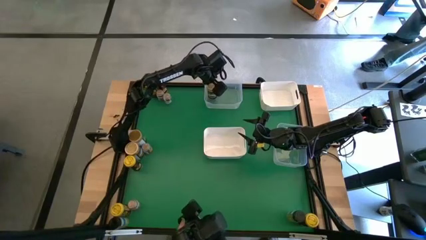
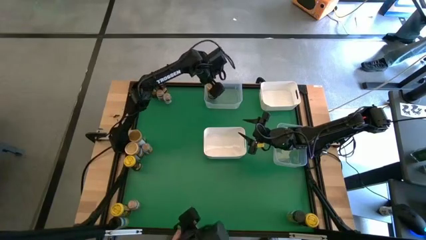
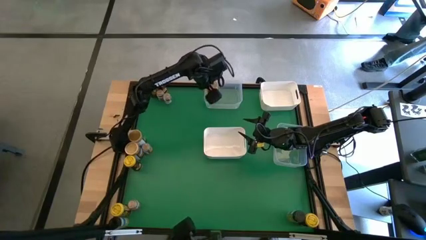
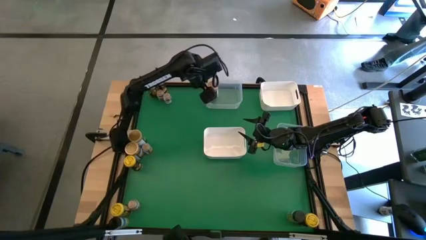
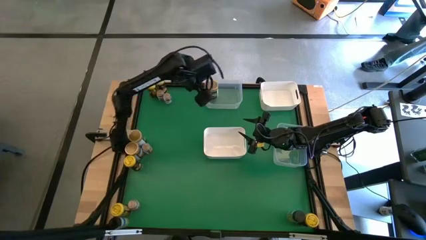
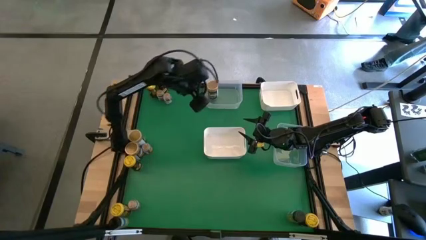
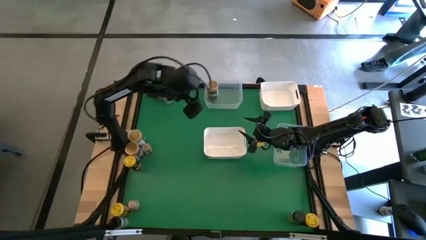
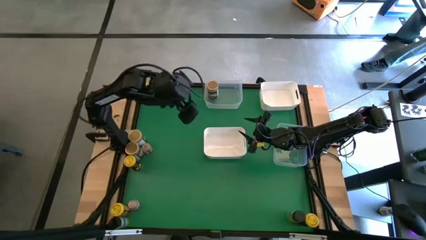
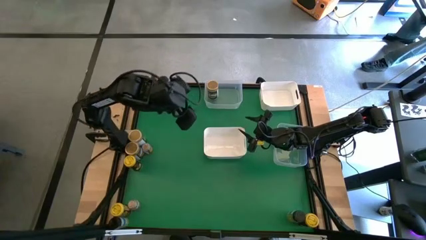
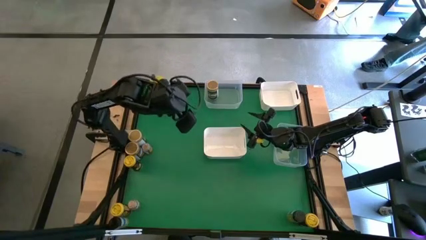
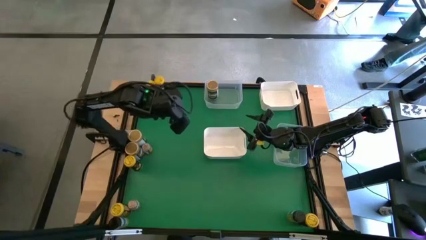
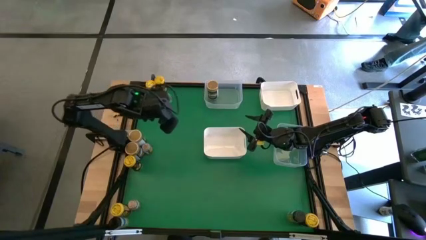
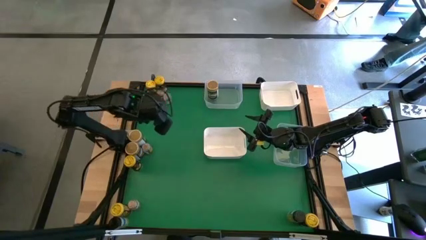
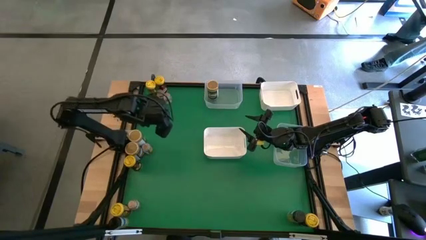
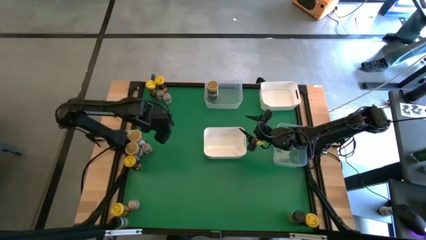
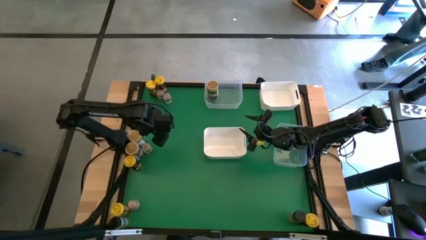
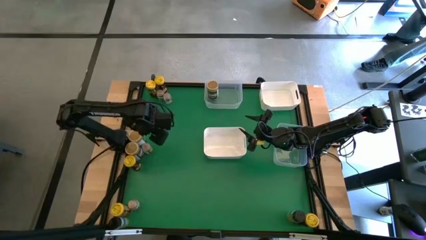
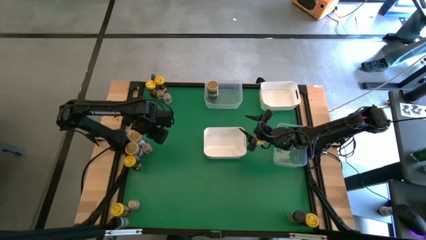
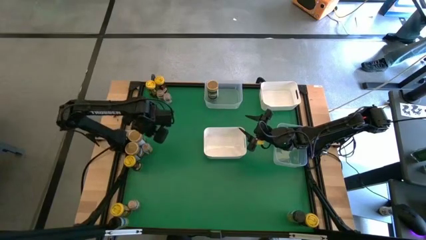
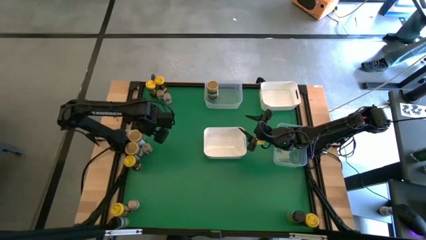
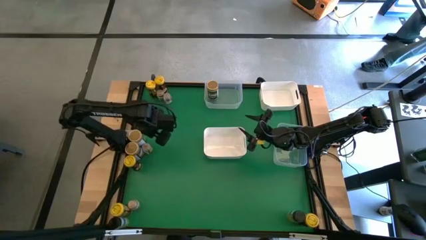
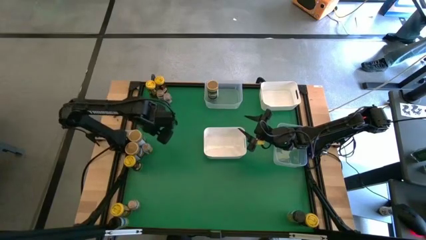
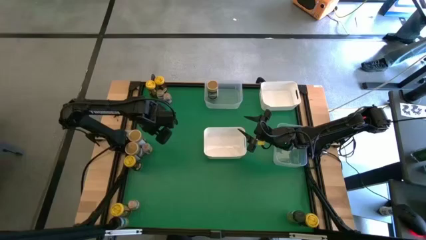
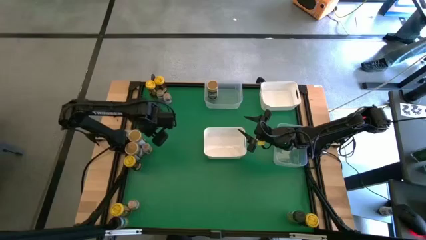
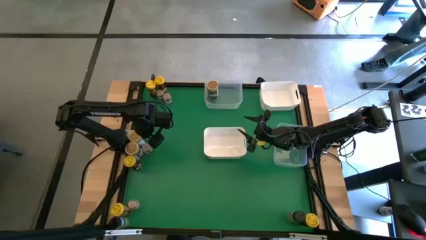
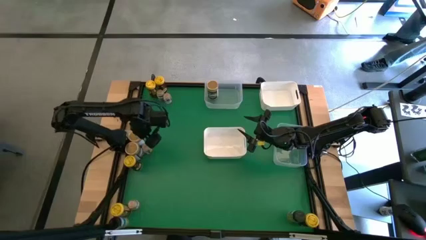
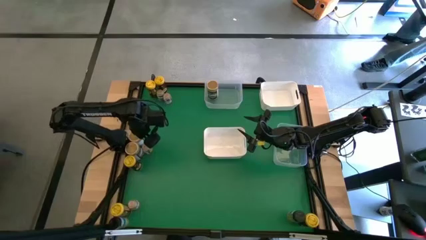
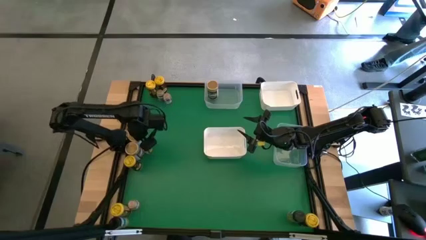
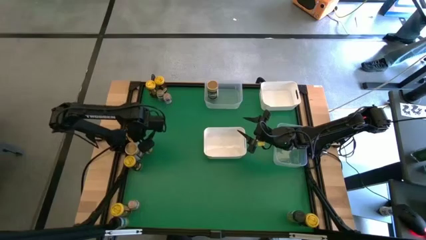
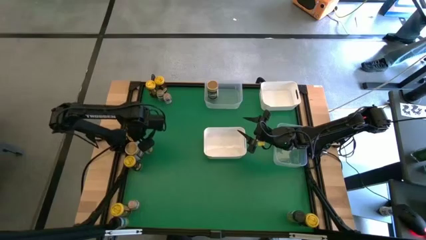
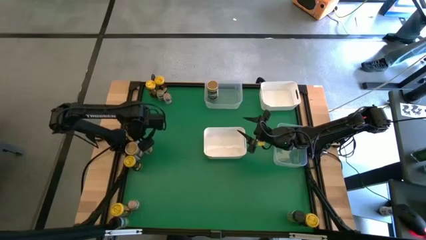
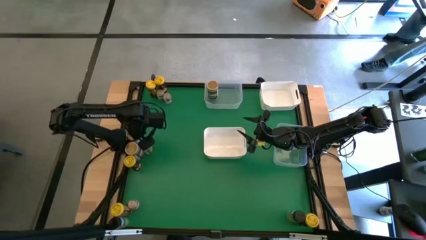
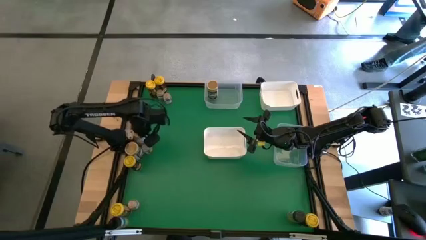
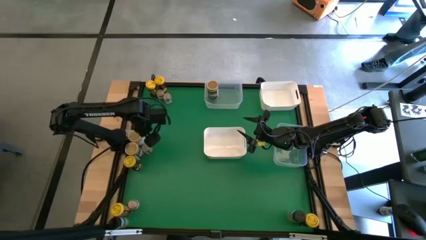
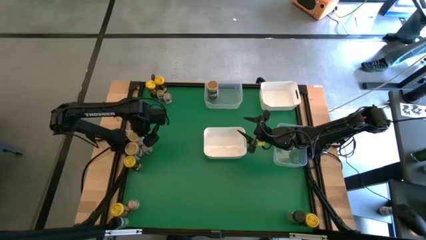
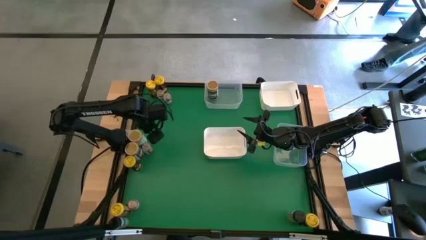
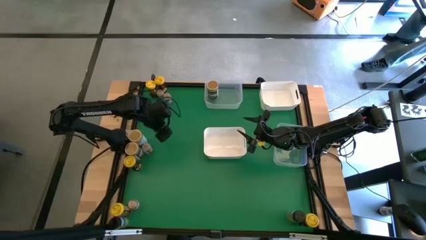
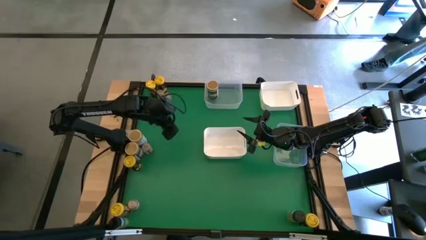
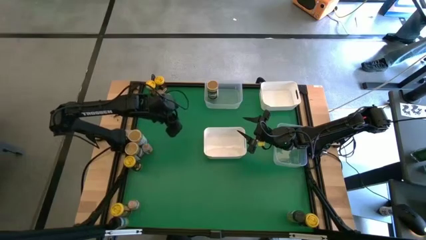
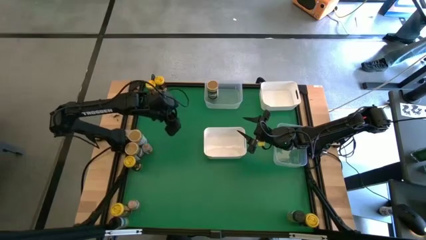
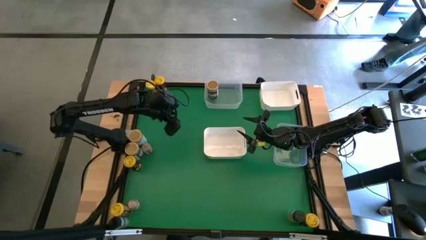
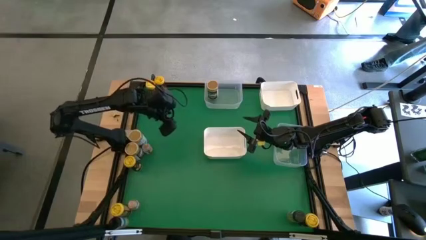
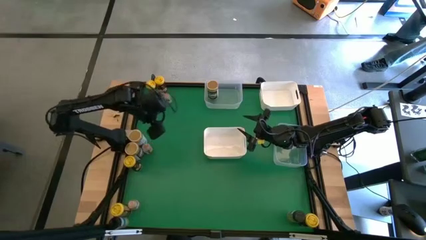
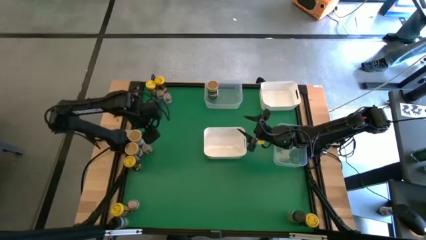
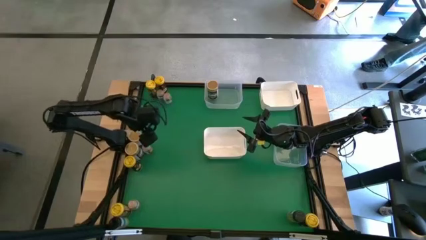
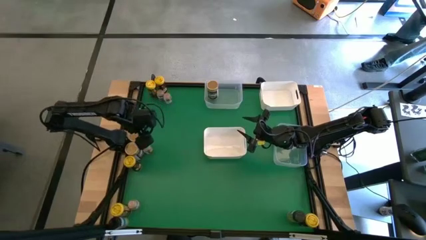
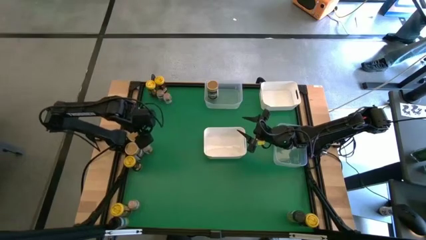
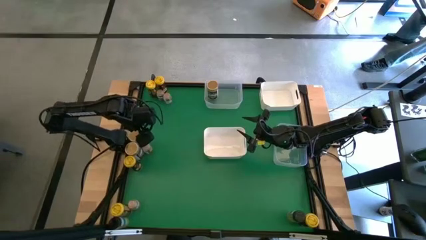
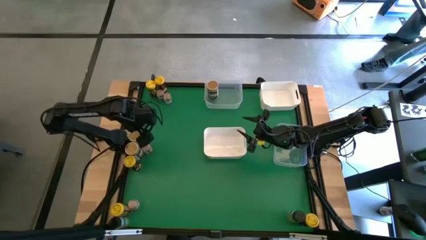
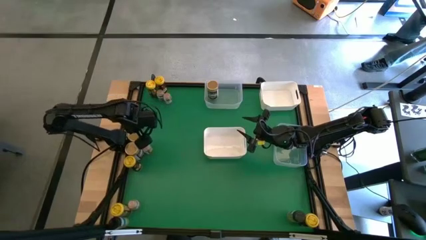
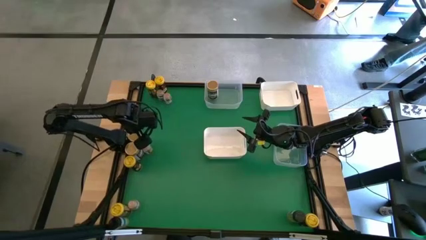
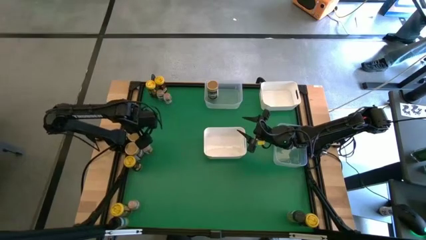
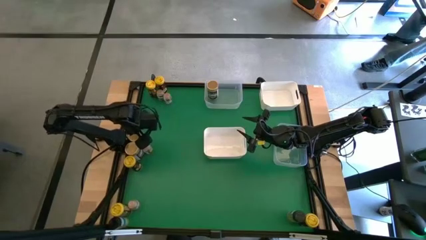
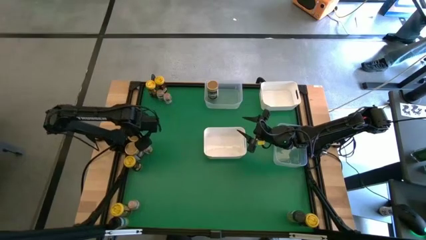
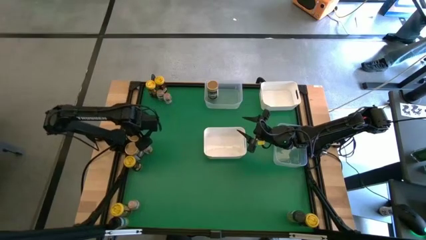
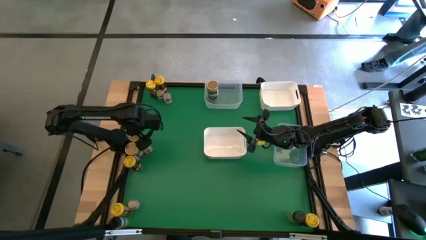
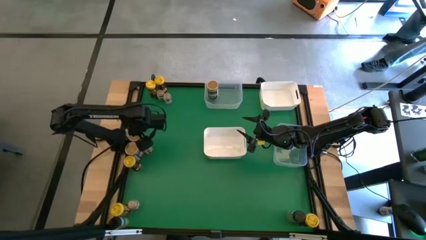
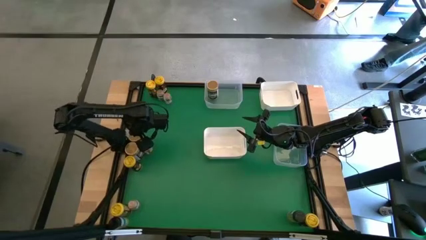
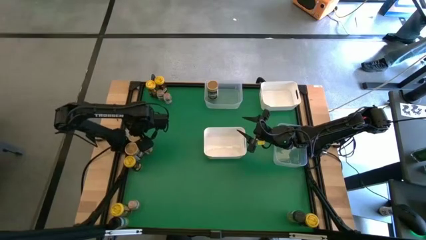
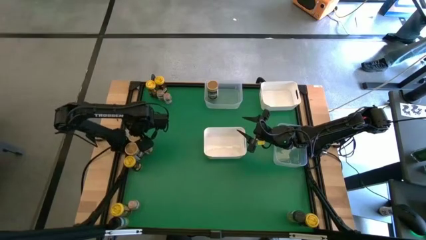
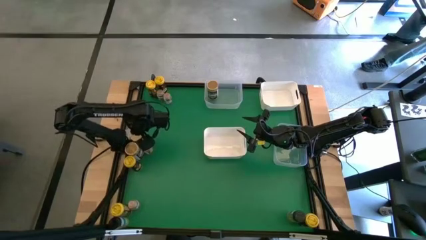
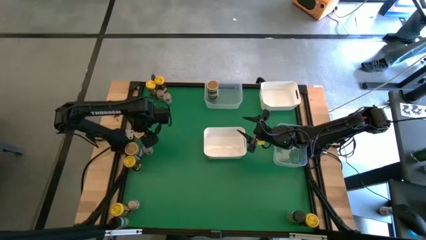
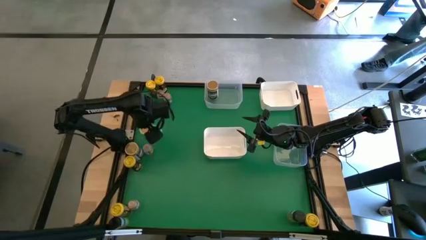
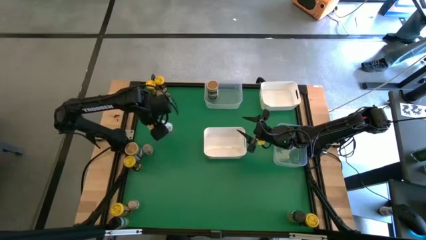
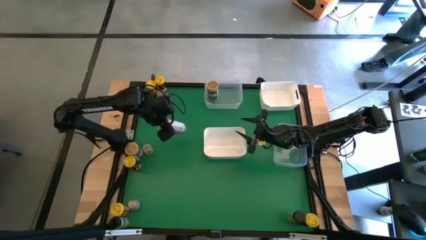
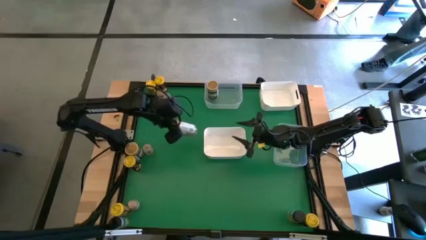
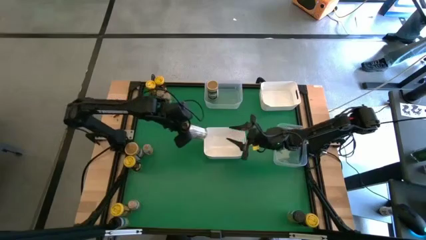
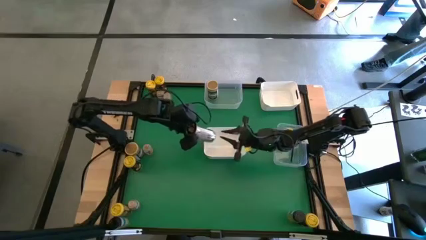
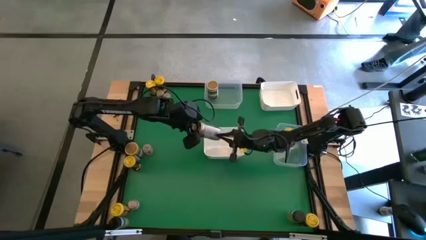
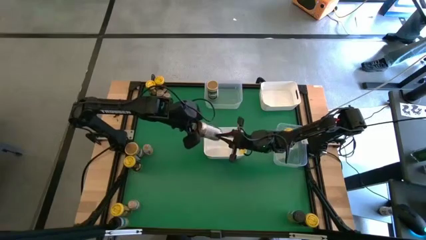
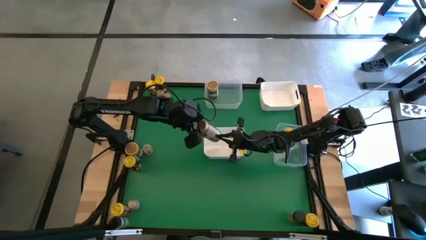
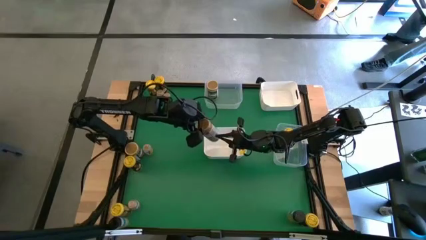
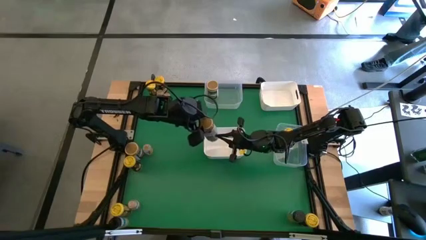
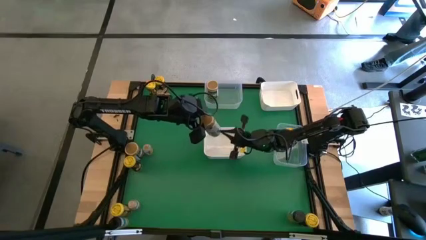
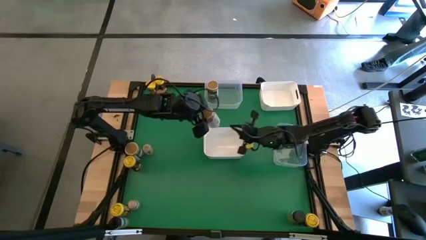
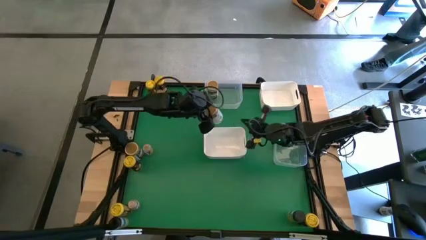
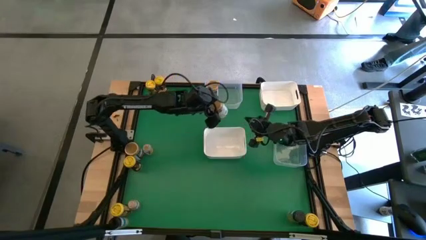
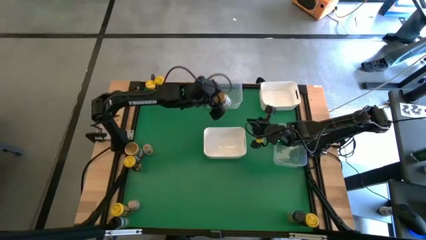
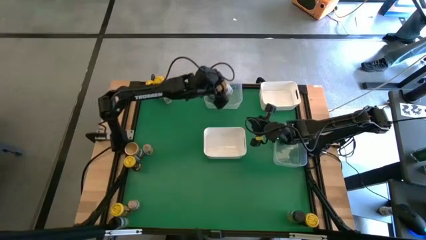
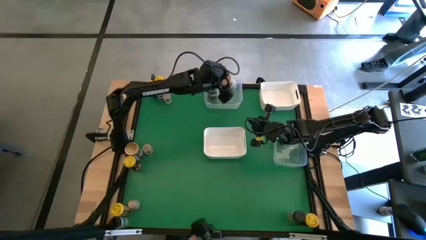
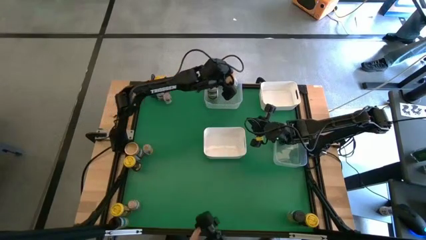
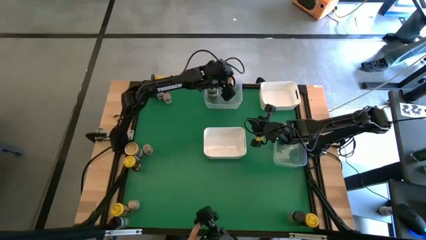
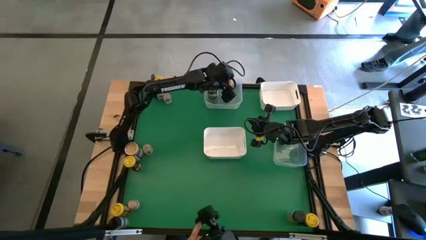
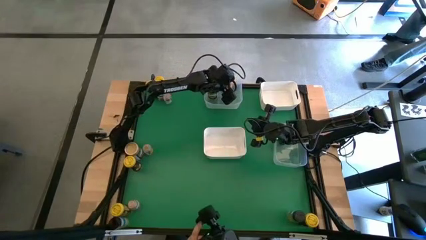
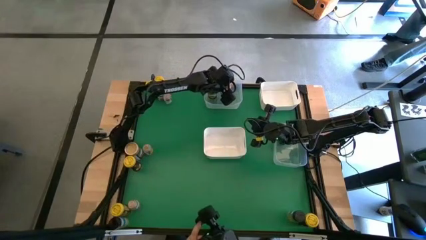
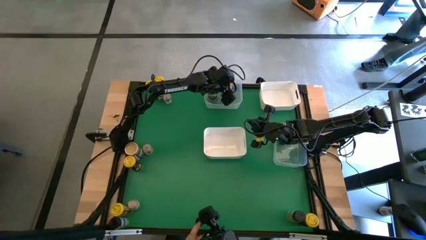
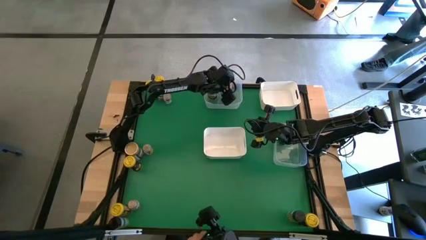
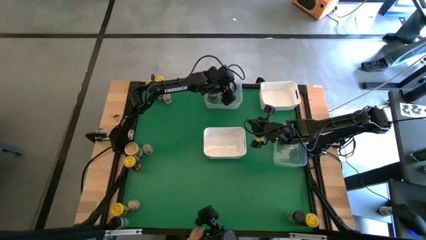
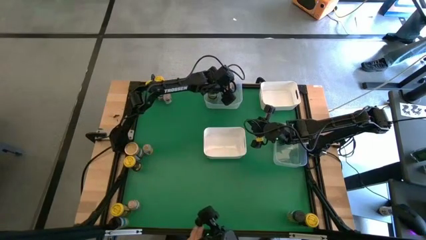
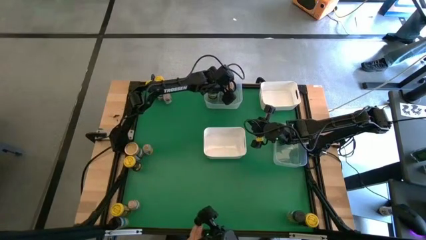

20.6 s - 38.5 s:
Task: Sort spices by type
Put the golden seasoning bottle into the top transparent bin
